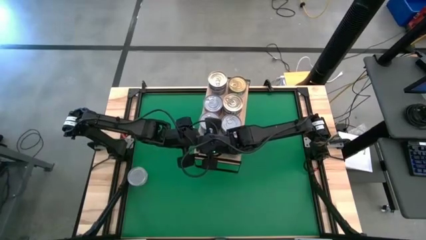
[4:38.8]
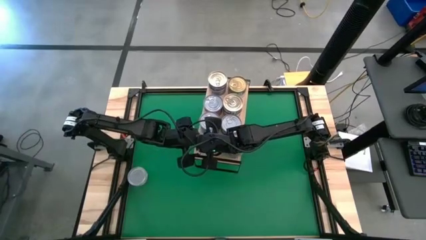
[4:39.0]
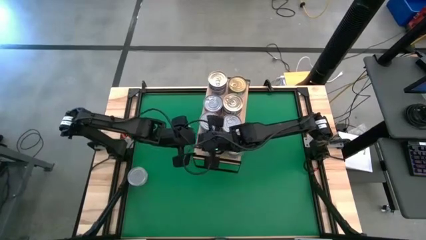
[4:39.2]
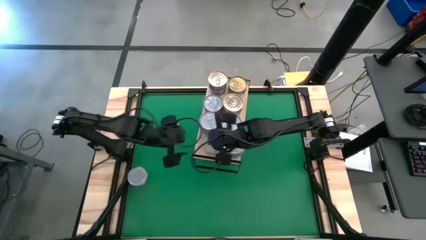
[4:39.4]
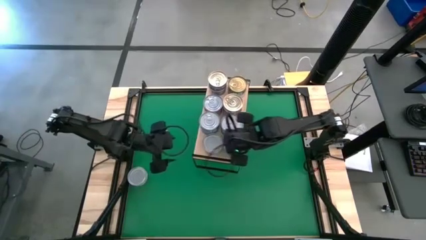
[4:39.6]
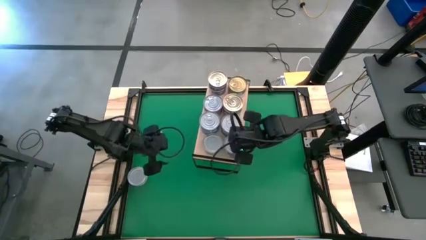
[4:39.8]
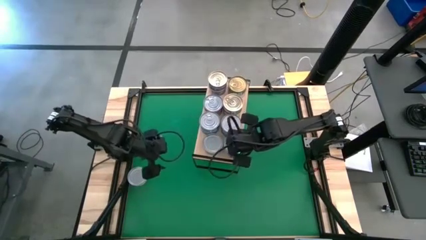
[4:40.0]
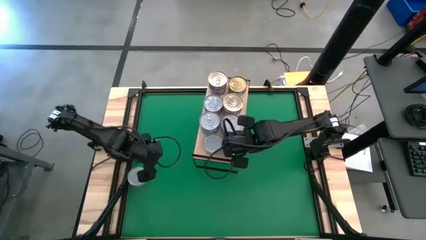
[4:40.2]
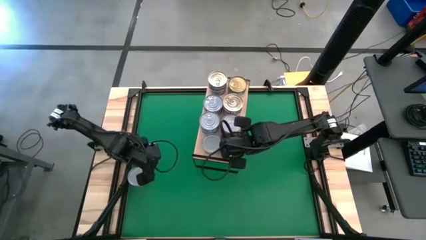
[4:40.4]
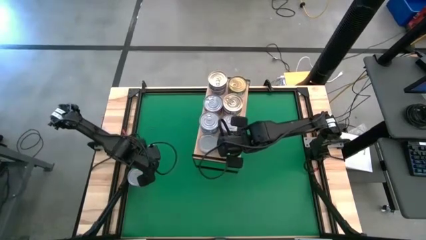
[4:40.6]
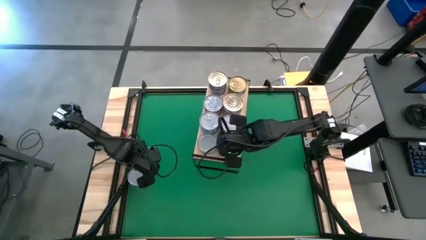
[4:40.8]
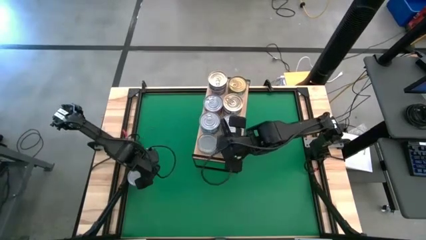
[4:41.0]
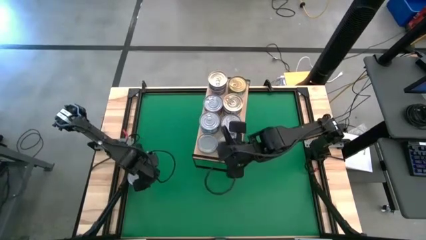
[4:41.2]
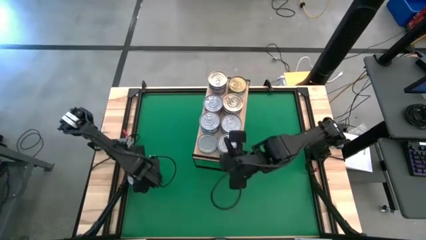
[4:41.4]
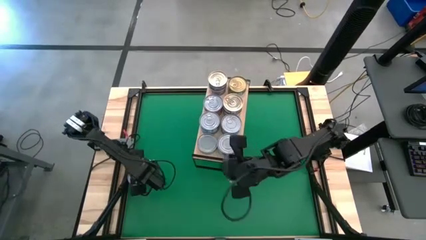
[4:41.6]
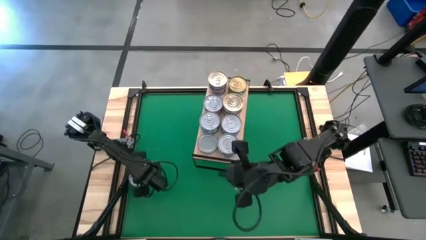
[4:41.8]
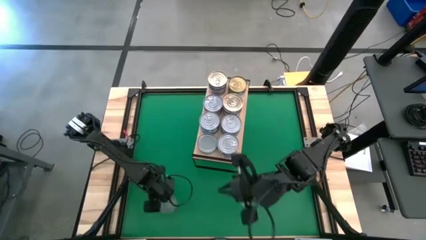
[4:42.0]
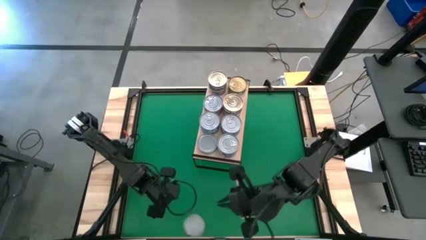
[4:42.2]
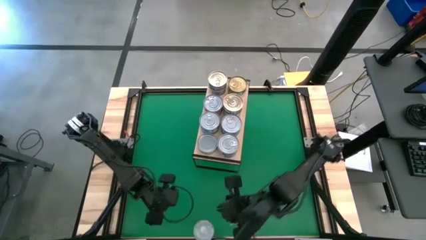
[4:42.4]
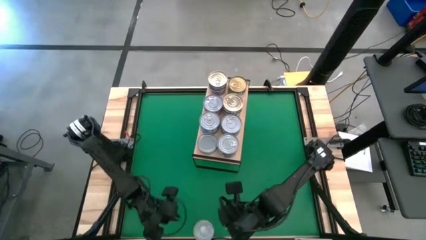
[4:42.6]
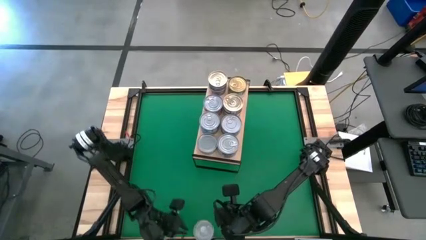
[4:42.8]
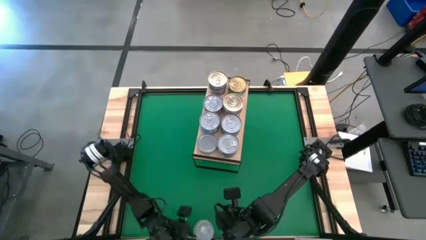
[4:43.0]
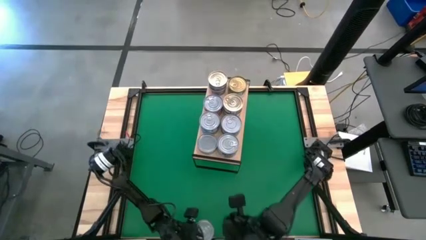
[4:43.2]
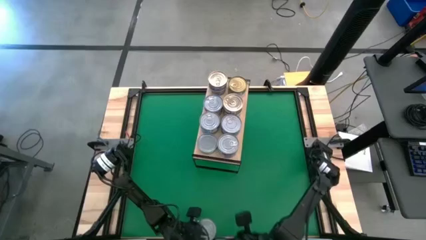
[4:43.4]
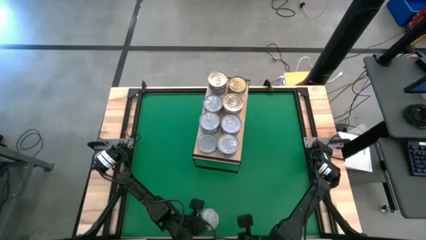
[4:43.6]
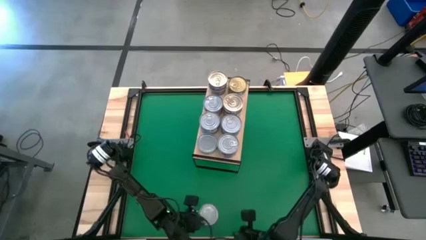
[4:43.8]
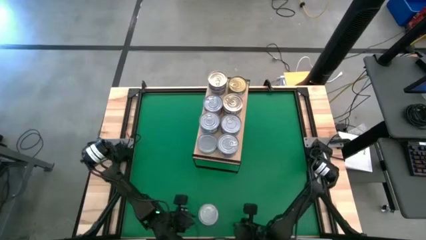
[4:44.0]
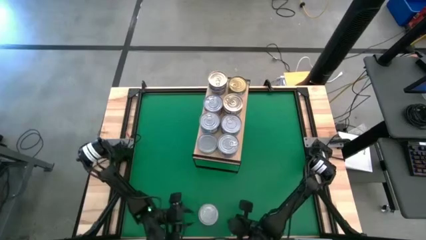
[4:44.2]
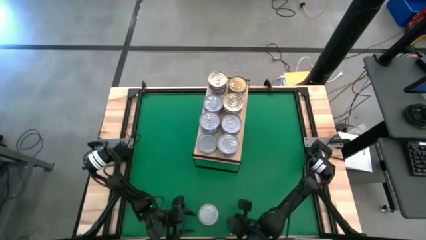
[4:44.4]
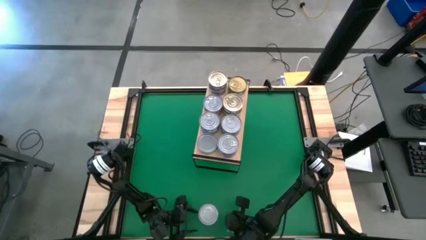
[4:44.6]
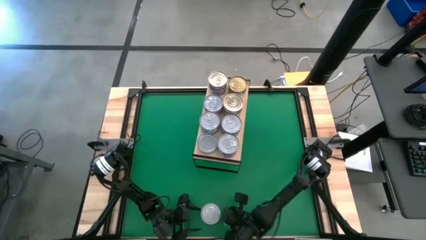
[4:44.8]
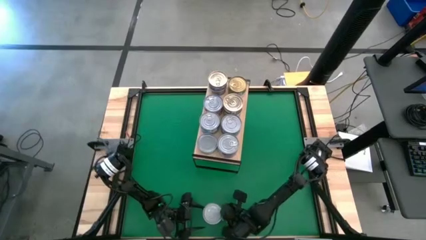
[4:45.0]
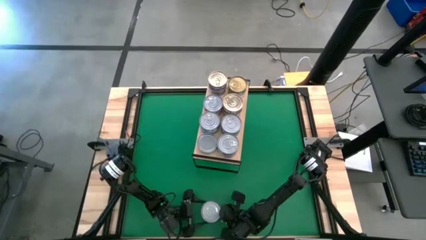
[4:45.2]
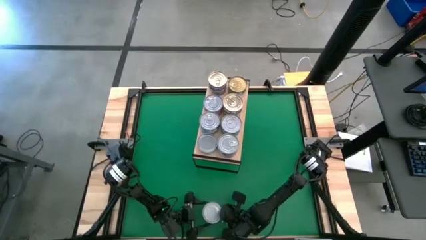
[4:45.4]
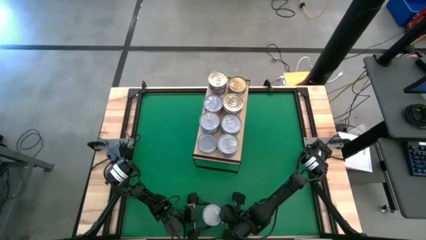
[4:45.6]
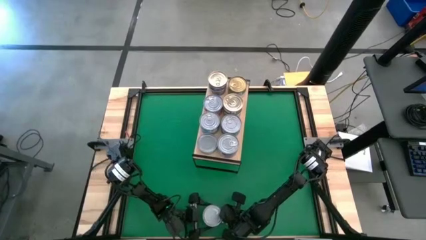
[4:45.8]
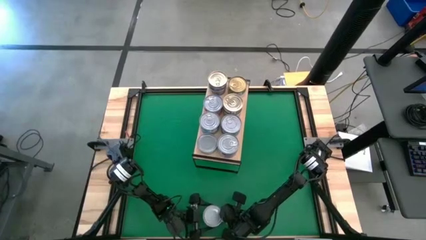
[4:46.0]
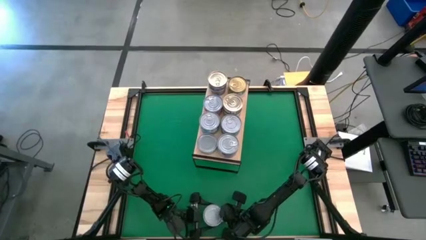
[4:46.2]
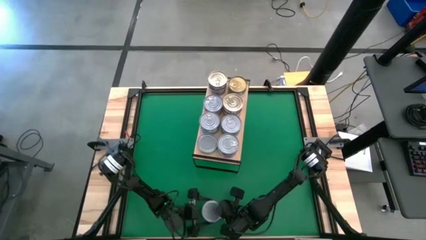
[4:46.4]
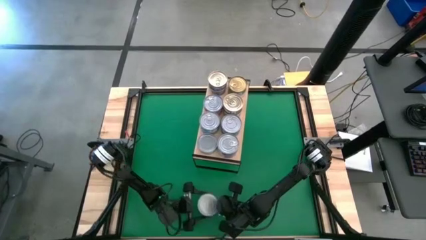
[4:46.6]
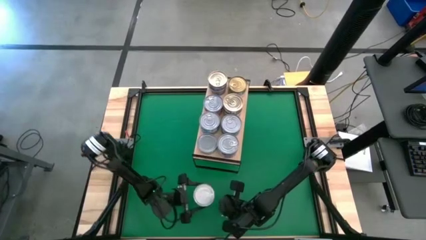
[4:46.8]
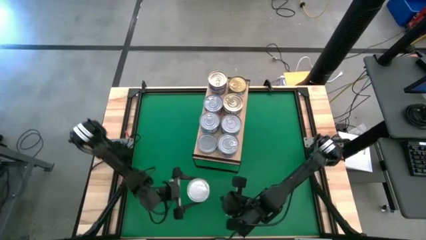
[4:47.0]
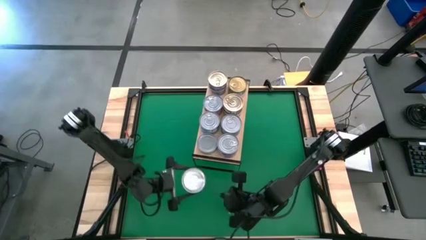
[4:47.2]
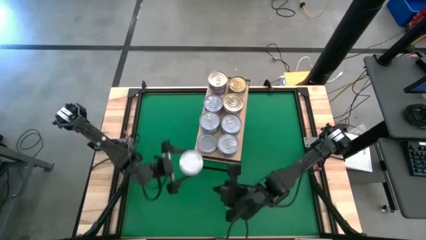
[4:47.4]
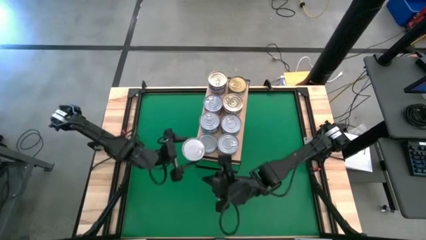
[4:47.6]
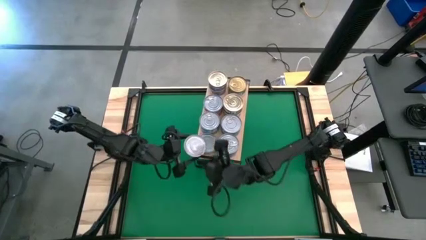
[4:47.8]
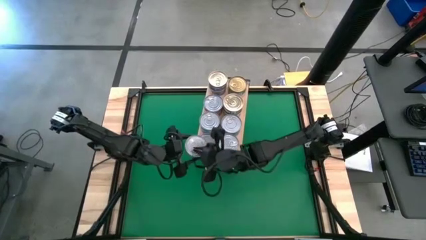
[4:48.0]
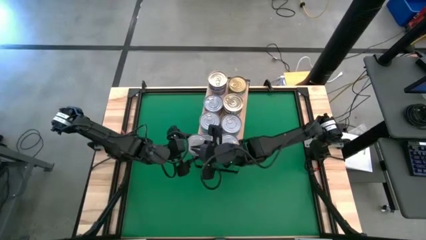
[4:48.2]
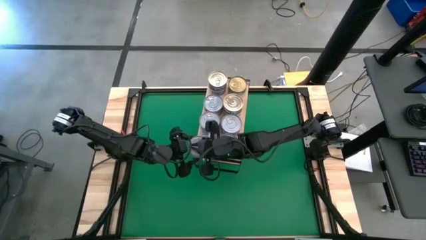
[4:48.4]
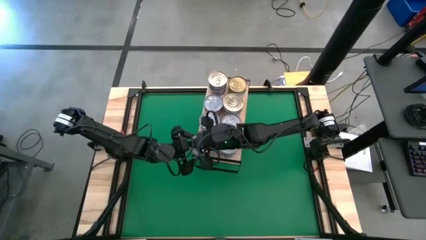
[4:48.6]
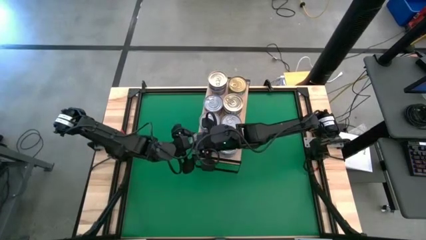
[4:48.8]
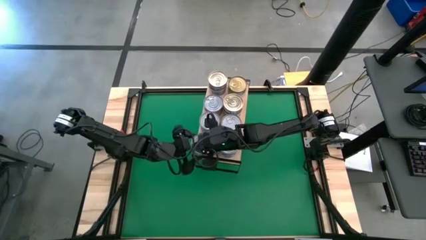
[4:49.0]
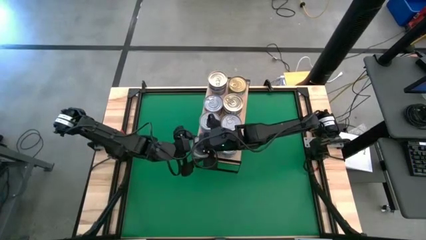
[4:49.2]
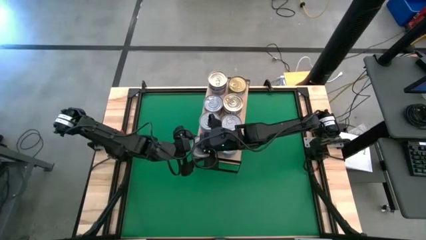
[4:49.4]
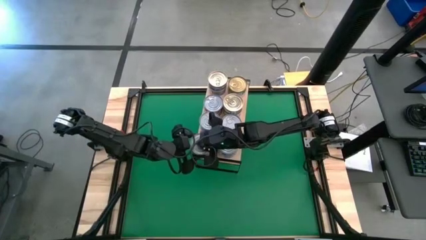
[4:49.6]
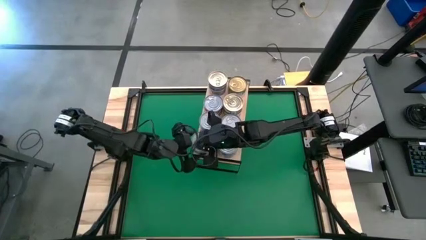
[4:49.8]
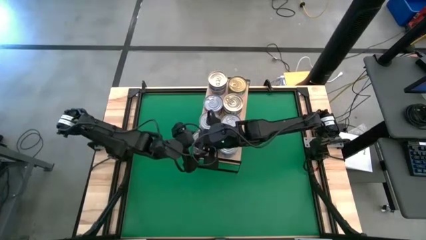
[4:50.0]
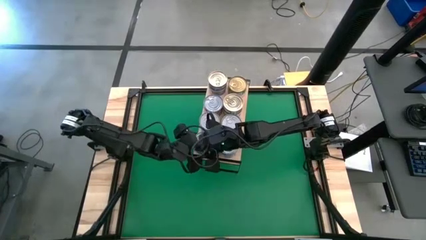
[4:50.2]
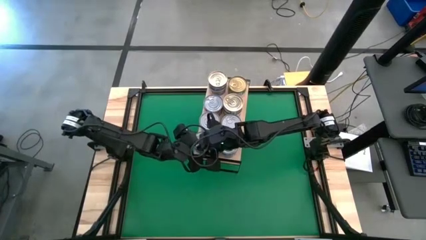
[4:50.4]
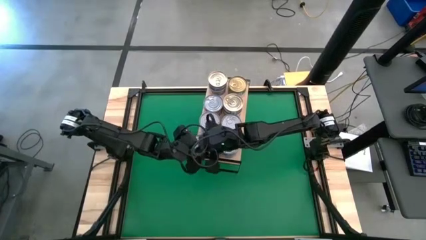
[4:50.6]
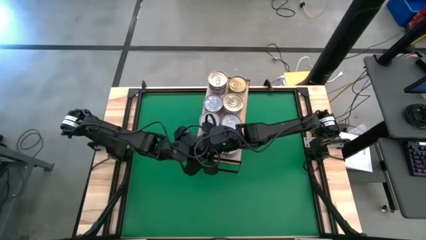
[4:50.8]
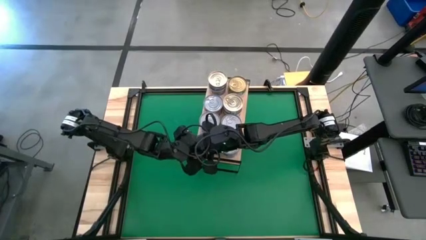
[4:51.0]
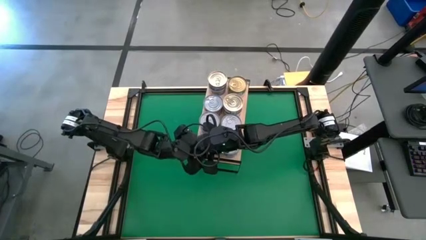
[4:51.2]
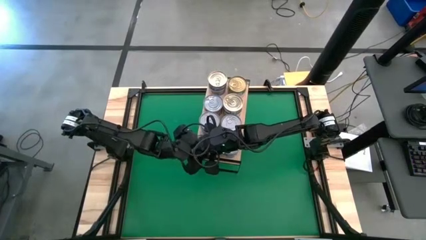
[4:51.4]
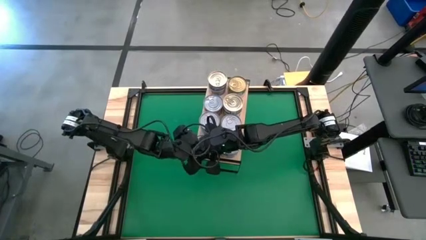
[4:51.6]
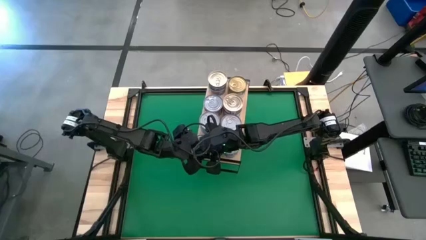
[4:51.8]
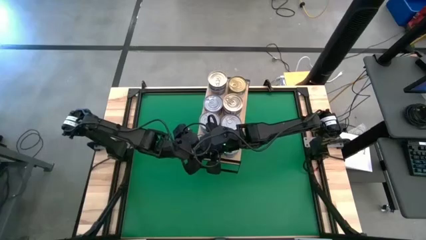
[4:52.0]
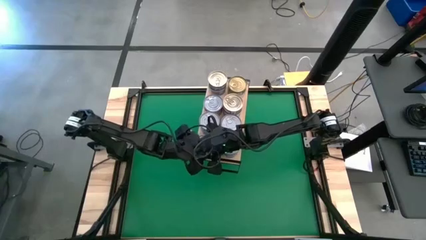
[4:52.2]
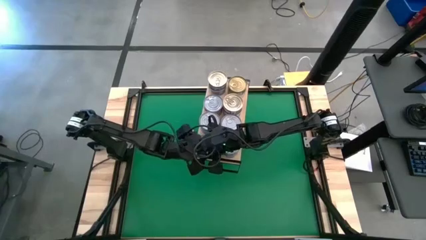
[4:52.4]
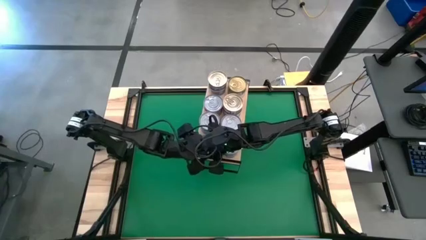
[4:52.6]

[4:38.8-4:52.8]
Task: Stack canned seafood by type on shelf
Stack the green tuna can on top of the other green can on the shelf
